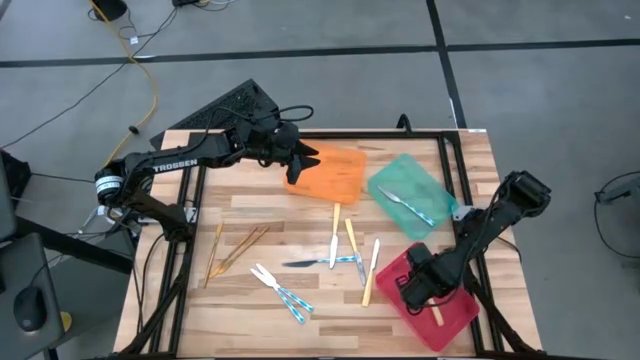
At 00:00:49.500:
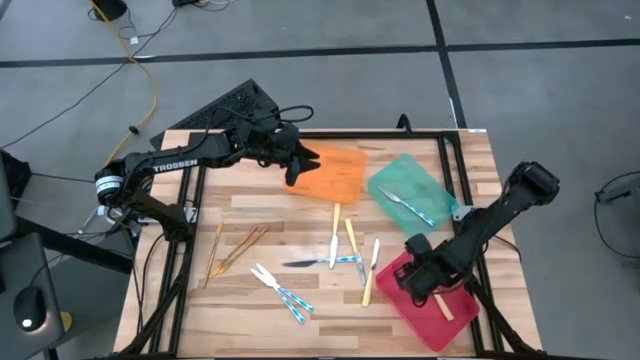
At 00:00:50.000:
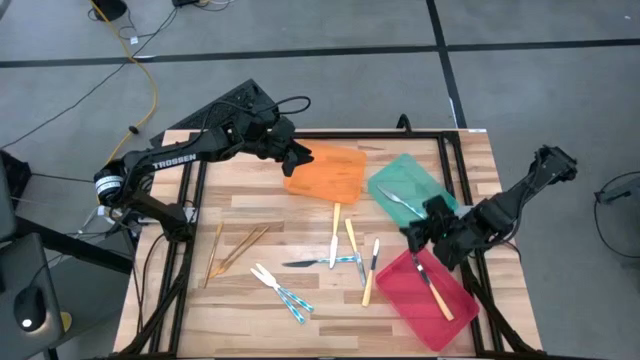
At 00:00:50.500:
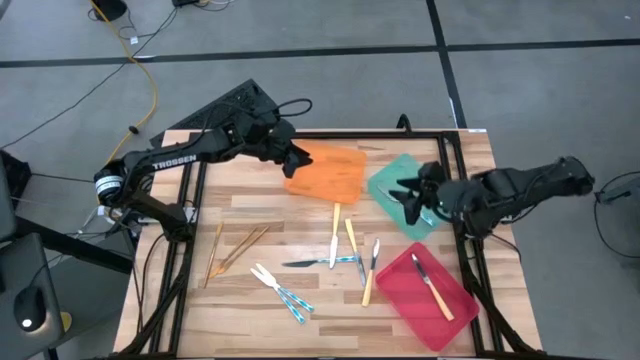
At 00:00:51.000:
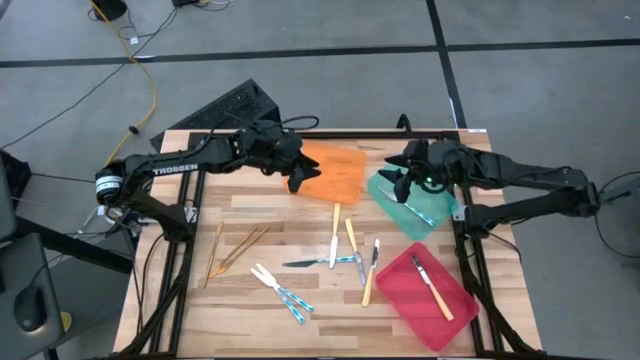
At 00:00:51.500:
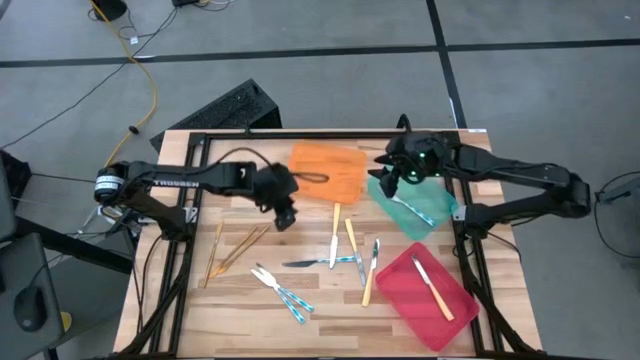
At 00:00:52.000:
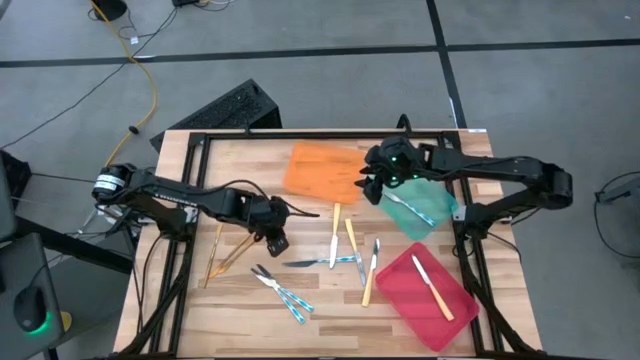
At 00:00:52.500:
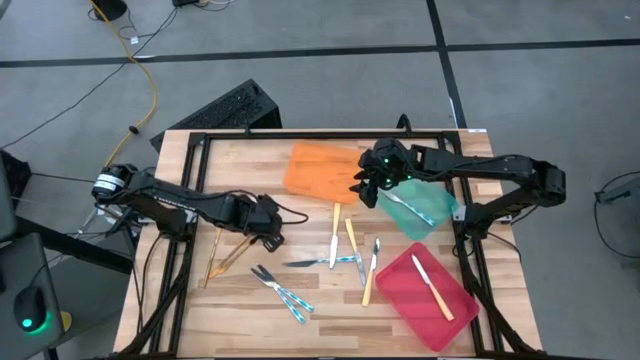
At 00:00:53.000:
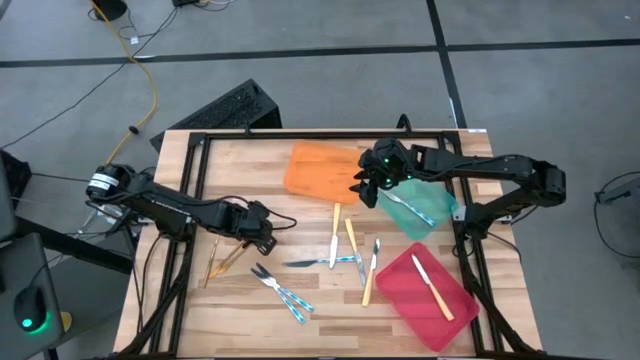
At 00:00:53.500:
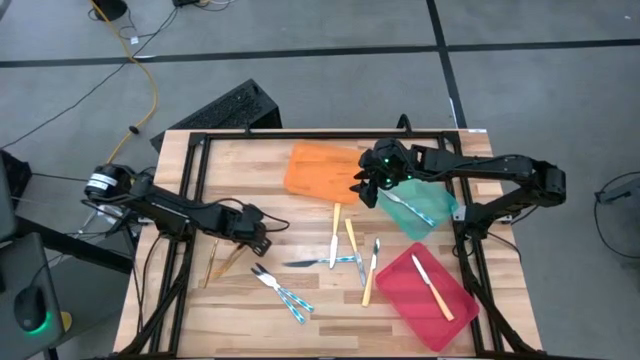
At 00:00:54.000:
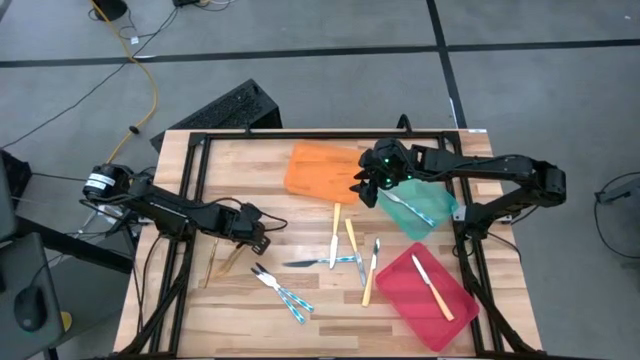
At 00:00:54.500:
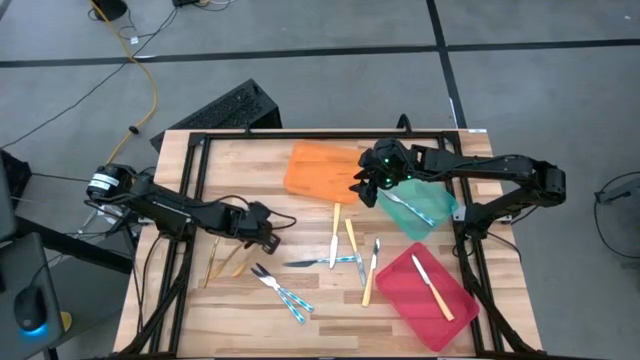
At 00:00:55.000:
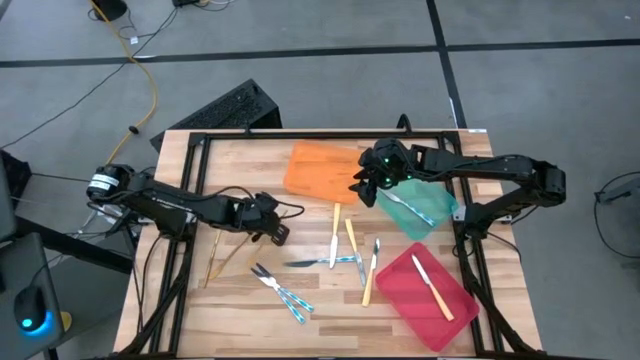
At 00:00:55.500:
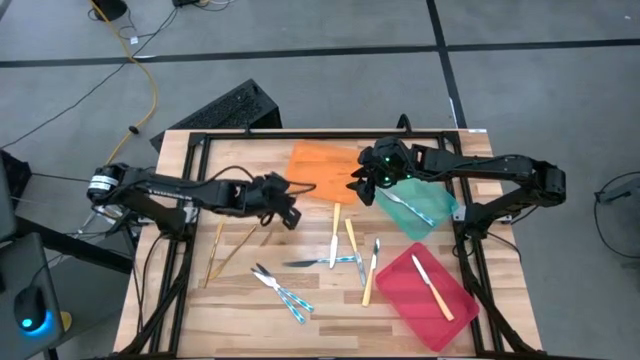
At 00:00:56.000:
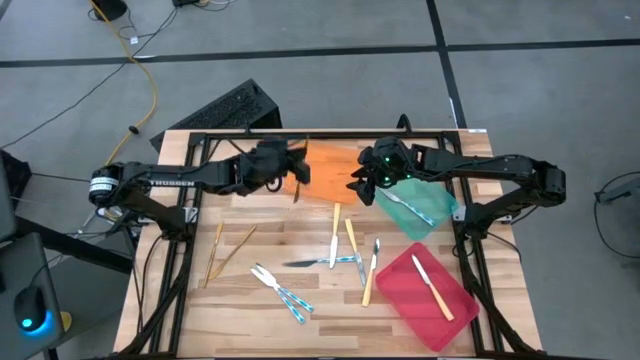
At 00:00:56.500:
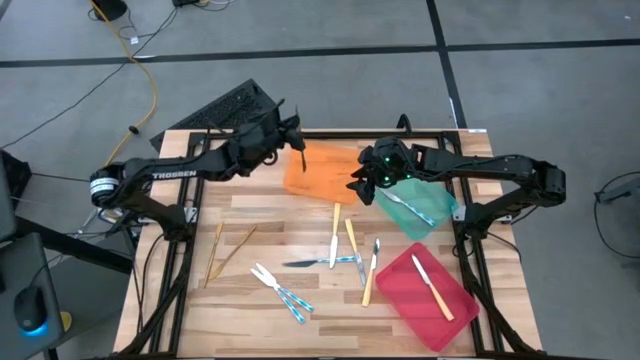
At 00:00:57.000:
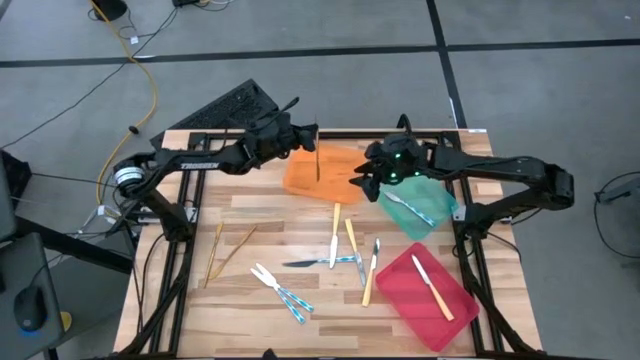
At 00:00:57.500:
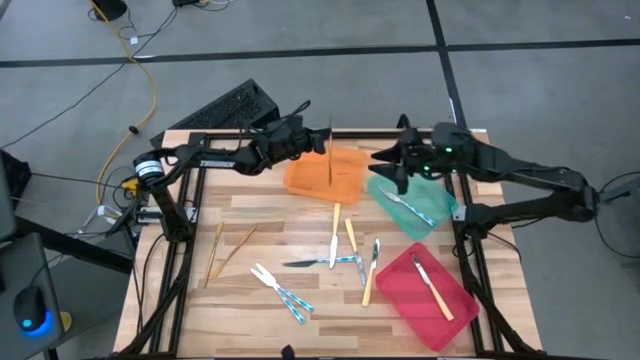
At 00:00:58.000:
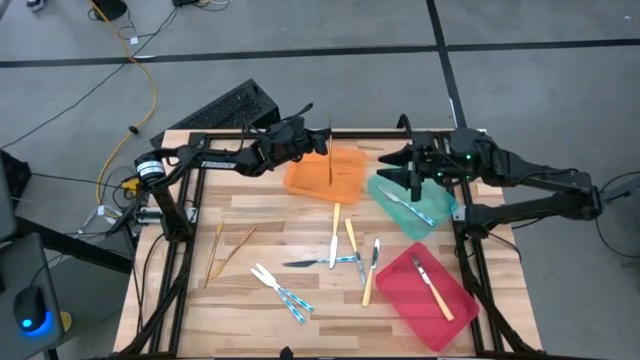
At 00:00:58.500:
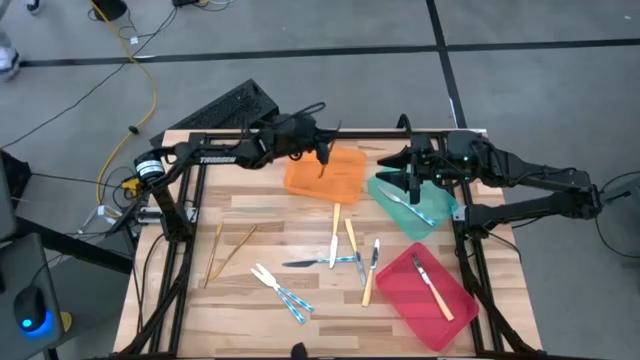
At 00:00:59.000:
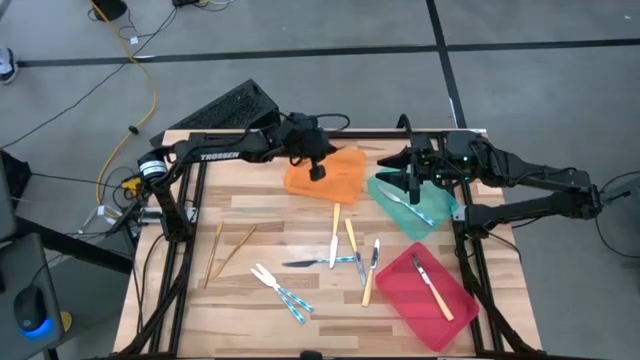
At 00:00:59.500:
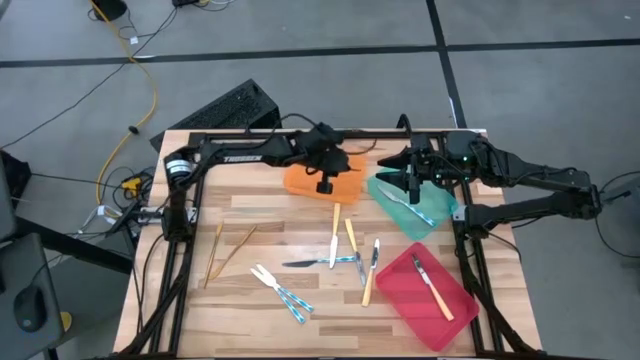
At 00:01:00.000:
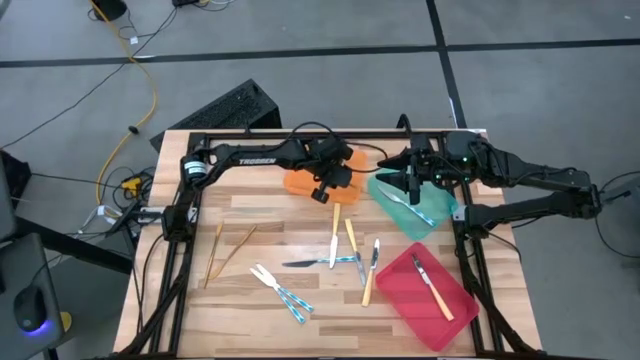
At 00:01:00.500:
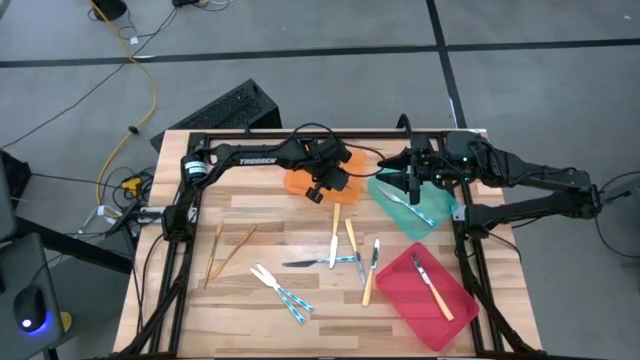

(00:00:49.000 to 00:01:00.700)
Task: Sort silverware by color (type)
Put the right gold knife into the orange bin

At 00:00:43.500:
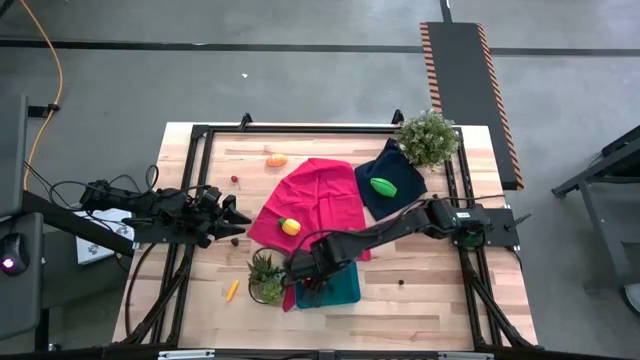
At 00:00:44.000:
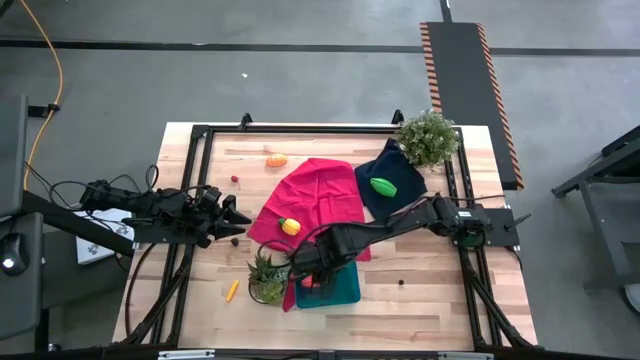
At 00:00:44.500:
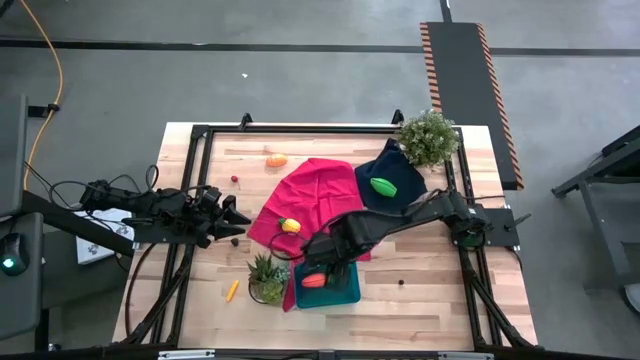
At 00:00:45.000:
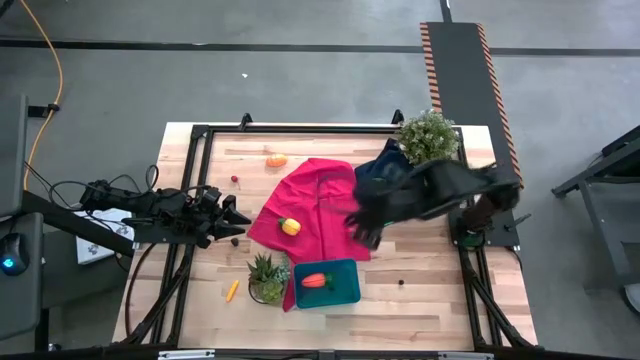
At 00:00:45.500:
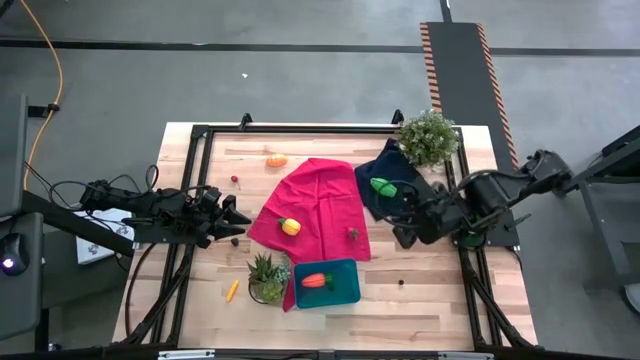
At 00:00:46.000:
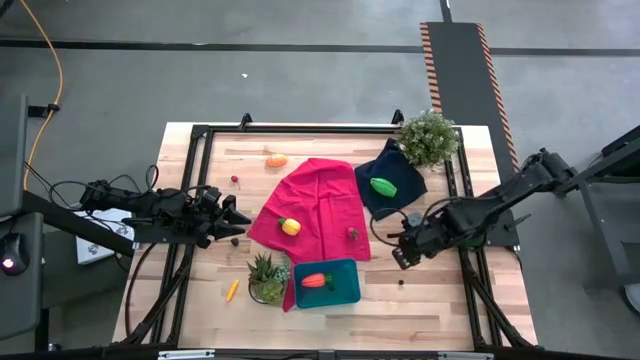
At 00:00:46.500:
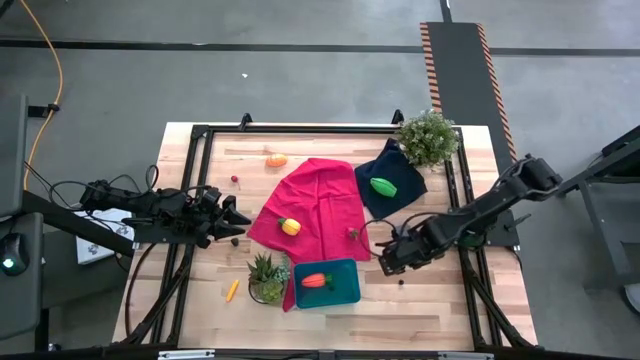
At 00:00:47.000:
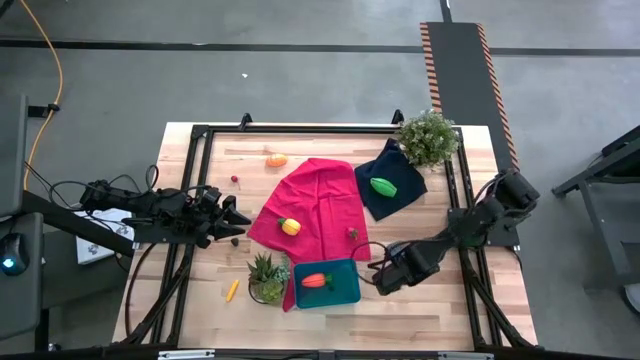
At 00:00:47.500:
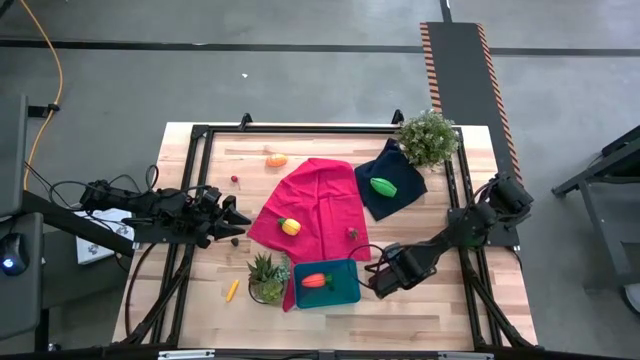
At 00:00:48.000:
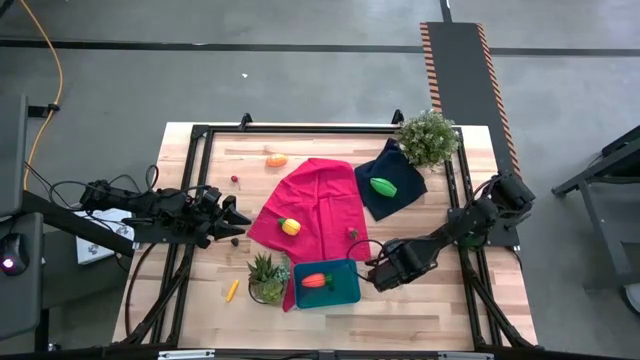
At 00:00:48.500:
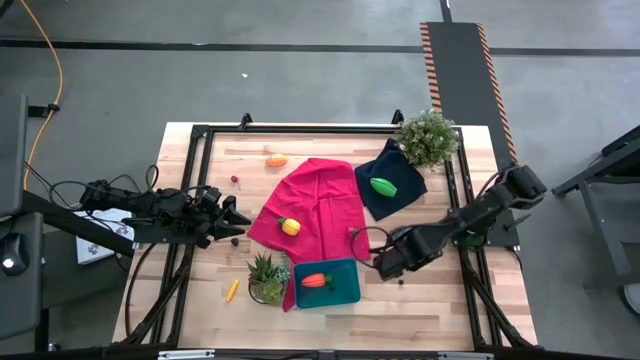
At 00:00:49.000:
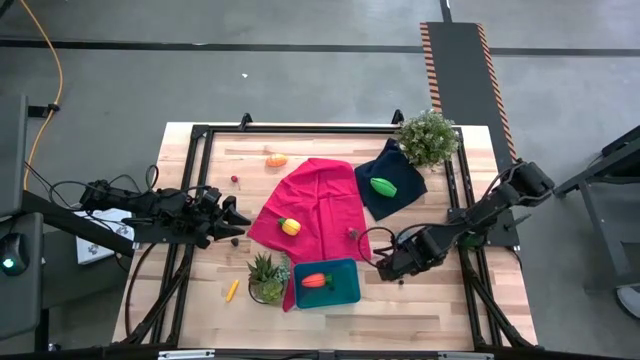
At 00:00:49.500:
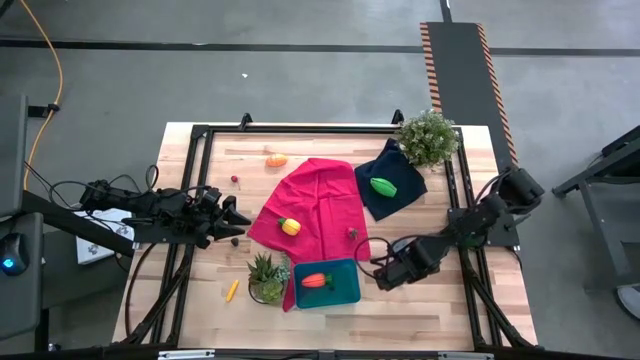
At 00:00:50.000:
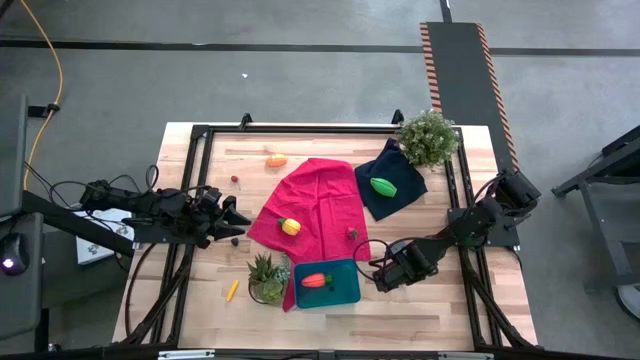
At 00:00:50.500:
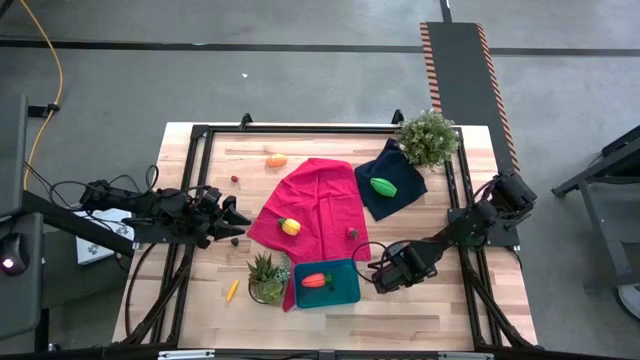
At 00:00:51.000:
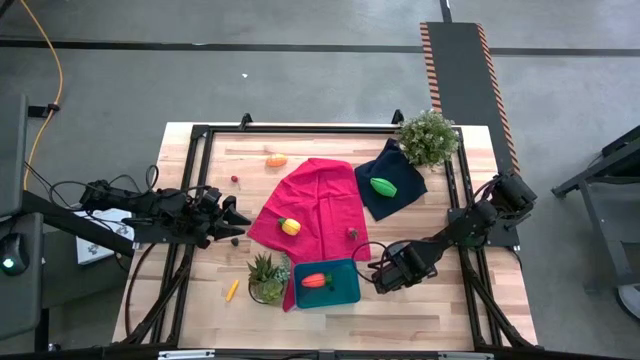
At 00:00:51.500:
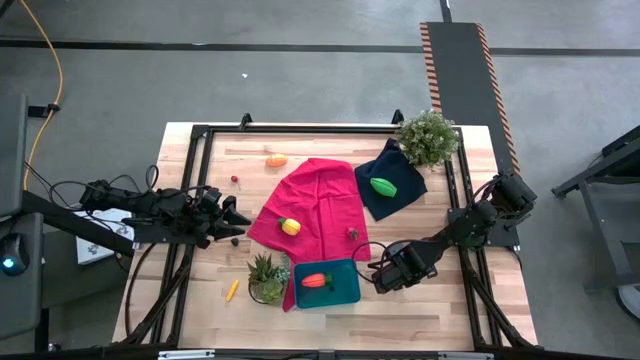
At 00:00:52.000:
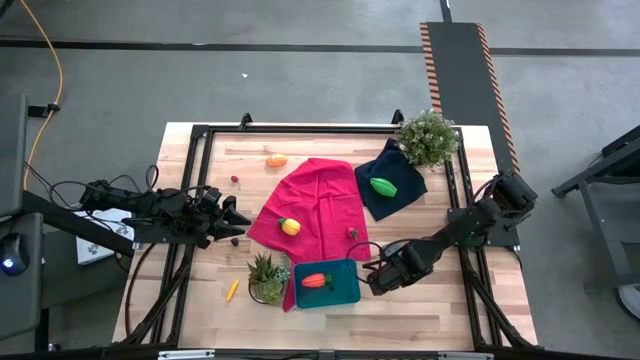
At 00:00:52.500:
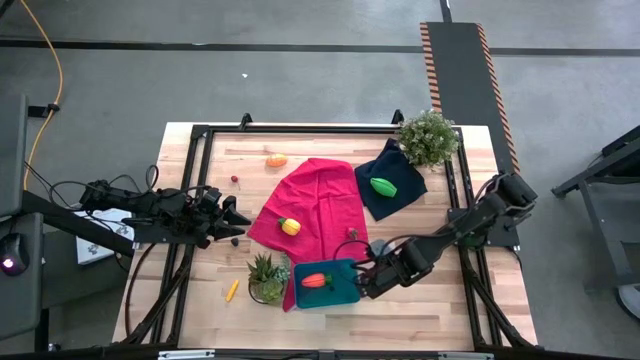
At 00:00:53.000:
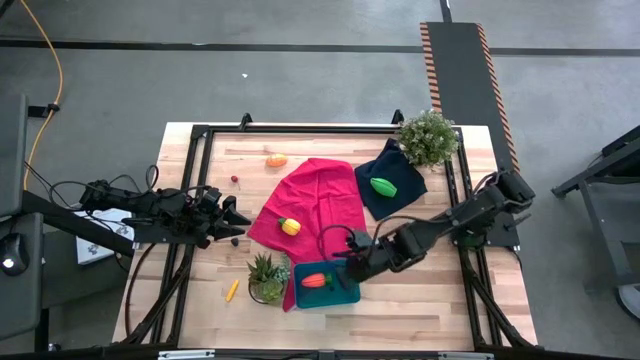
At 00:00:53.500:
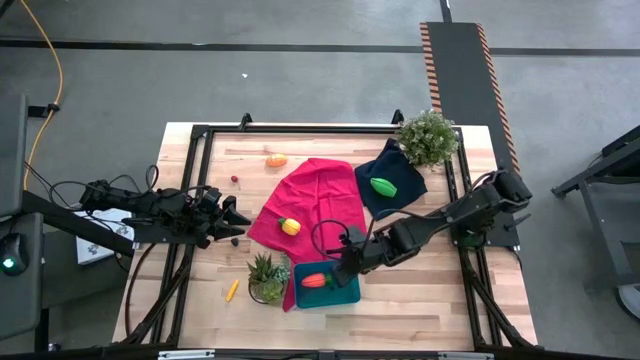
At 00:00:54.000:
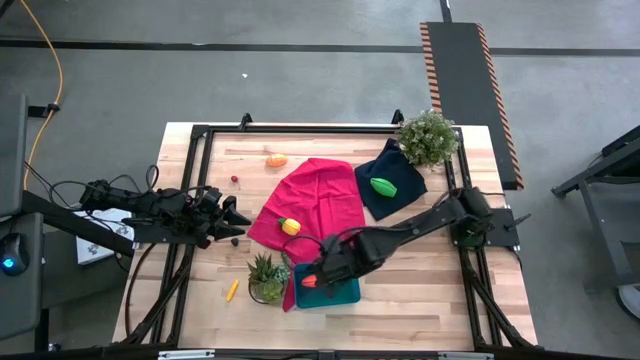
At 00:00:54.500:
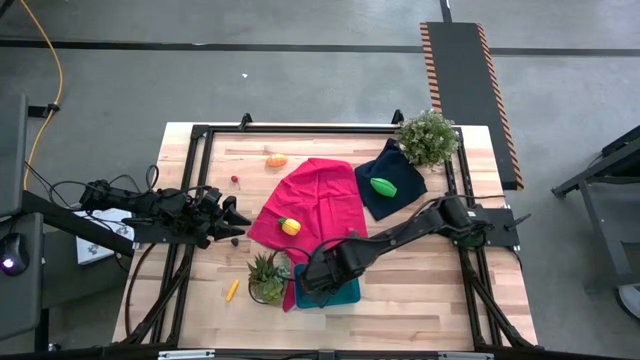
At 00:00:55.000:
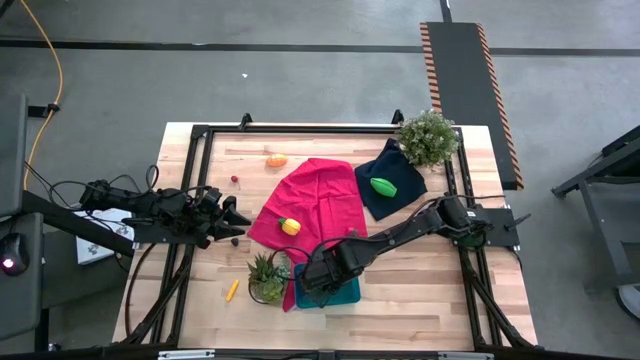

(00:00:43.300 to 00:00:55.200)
Task: Pick and placing Produce into tupperware
Put the blueberry into the blue bin
